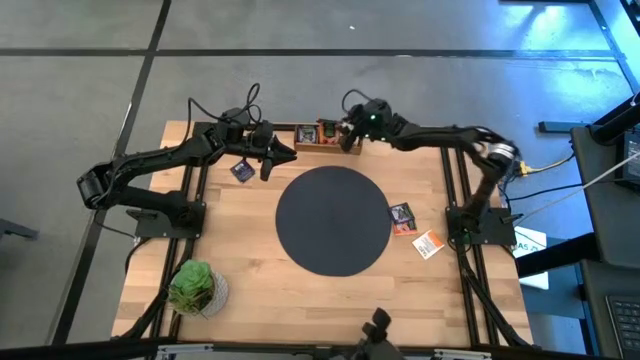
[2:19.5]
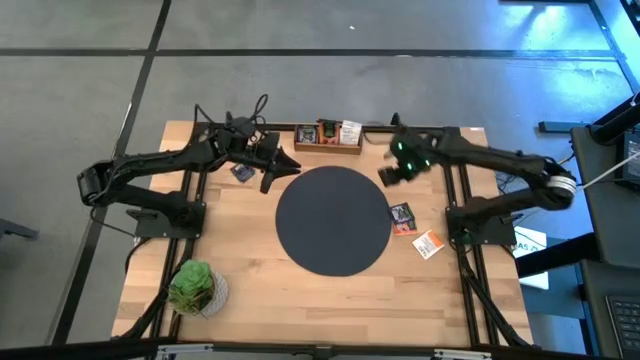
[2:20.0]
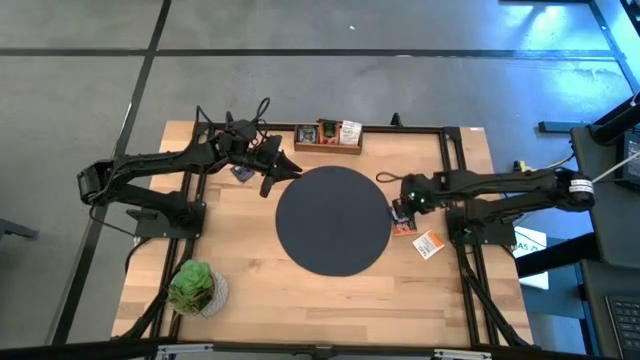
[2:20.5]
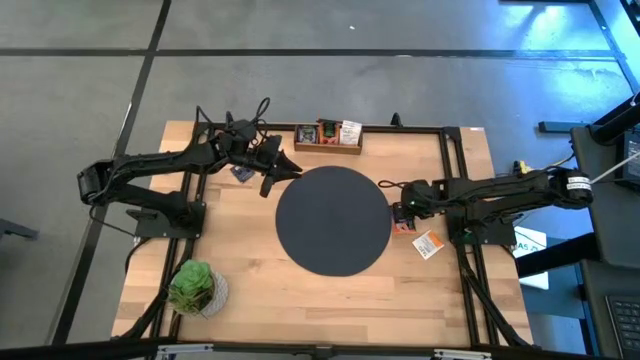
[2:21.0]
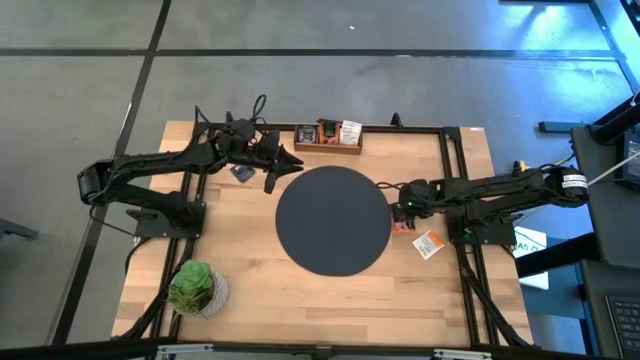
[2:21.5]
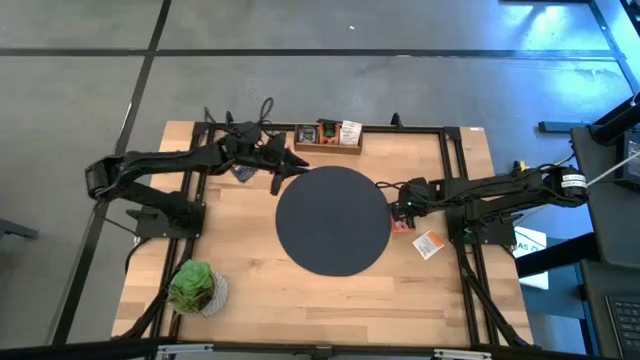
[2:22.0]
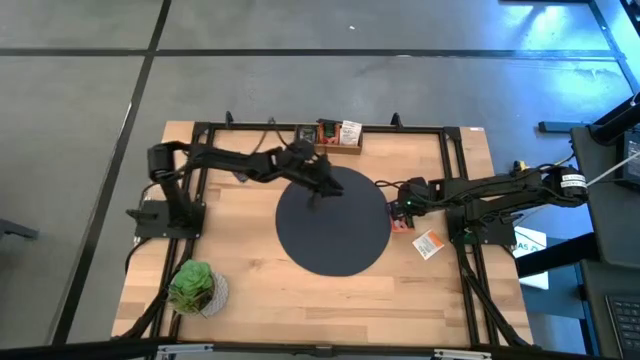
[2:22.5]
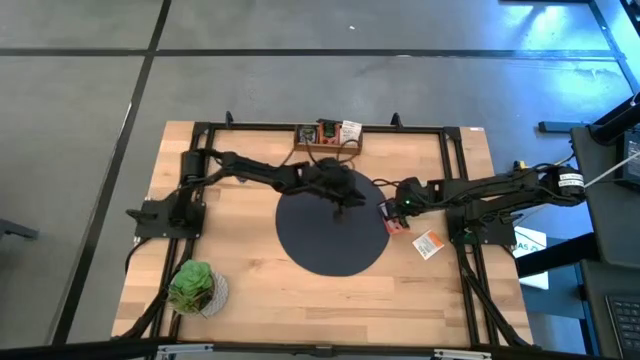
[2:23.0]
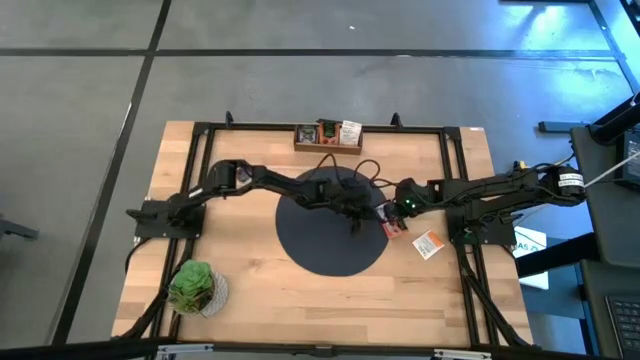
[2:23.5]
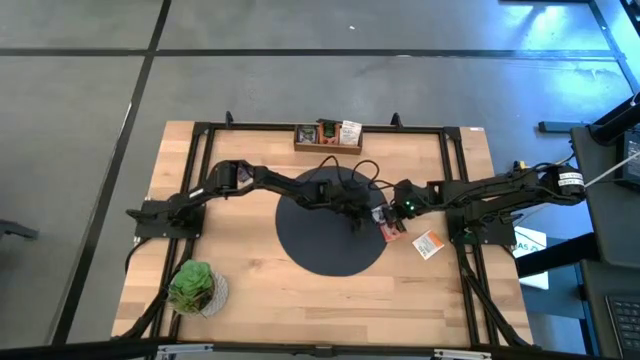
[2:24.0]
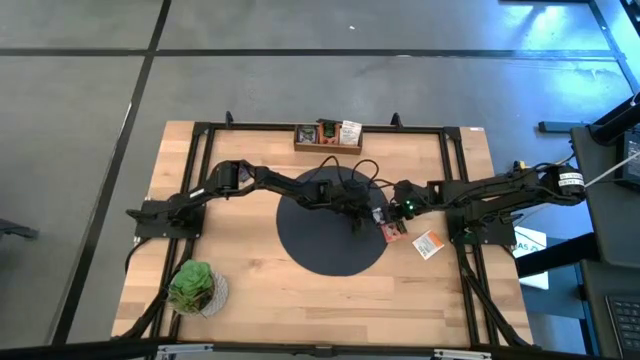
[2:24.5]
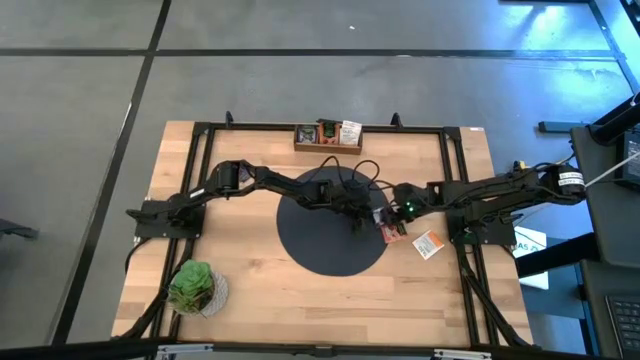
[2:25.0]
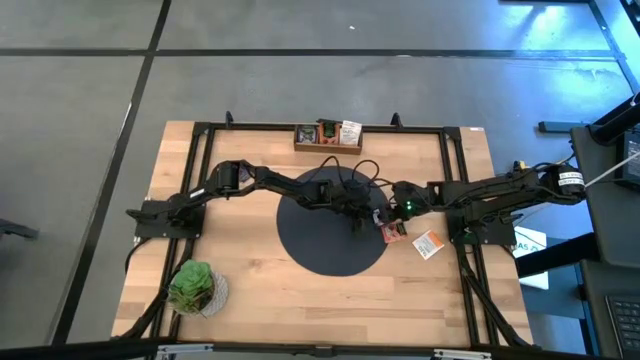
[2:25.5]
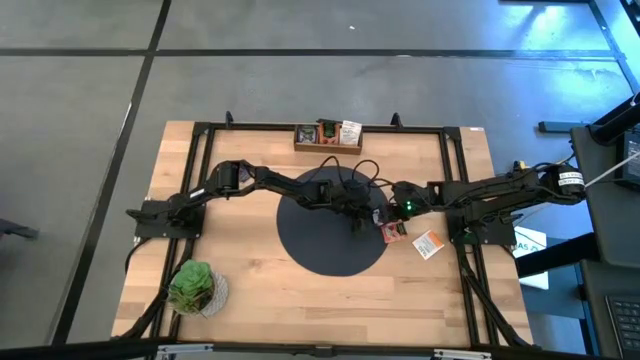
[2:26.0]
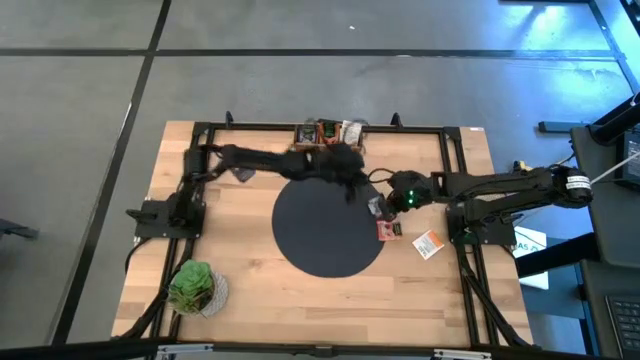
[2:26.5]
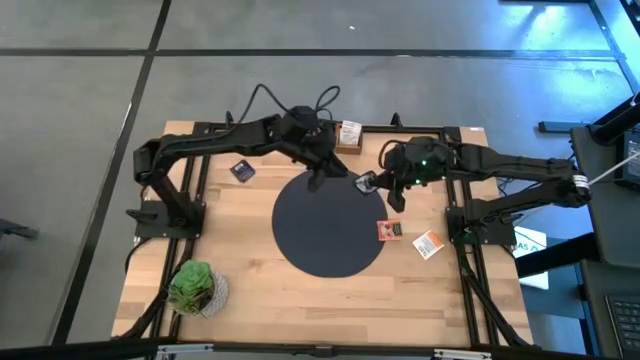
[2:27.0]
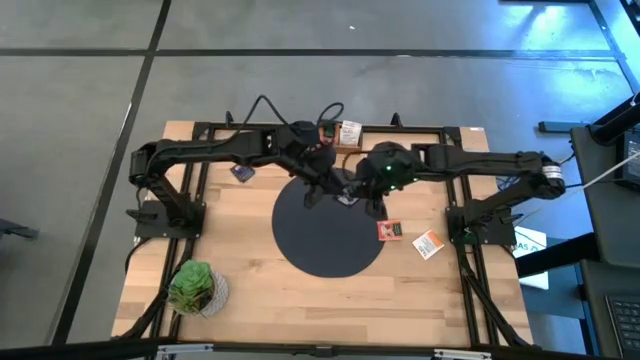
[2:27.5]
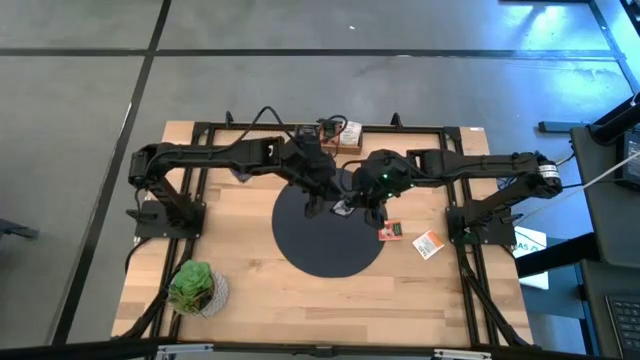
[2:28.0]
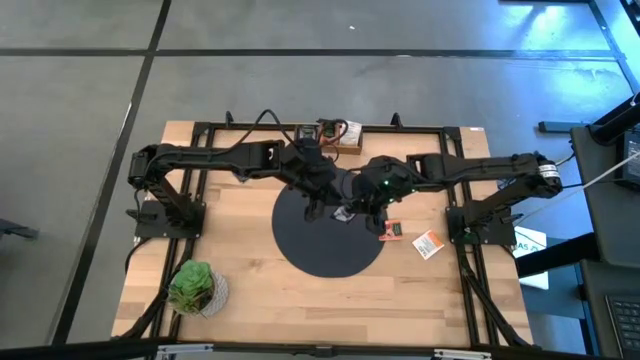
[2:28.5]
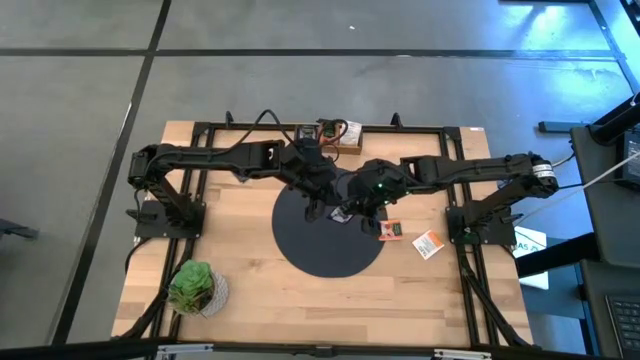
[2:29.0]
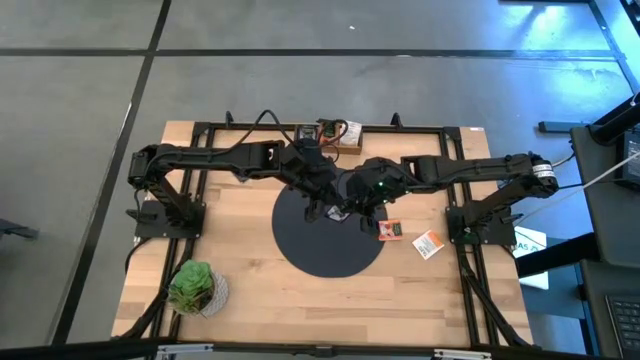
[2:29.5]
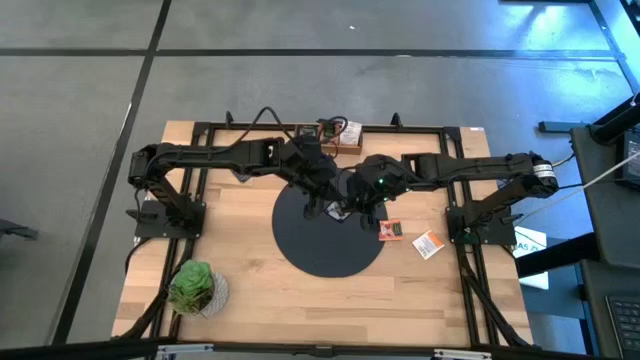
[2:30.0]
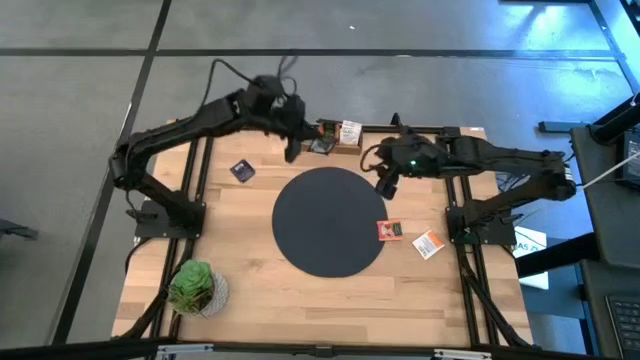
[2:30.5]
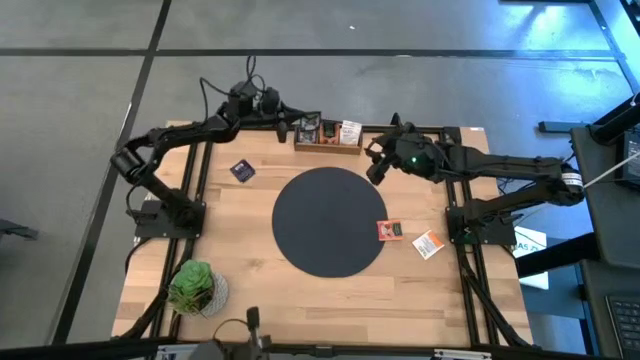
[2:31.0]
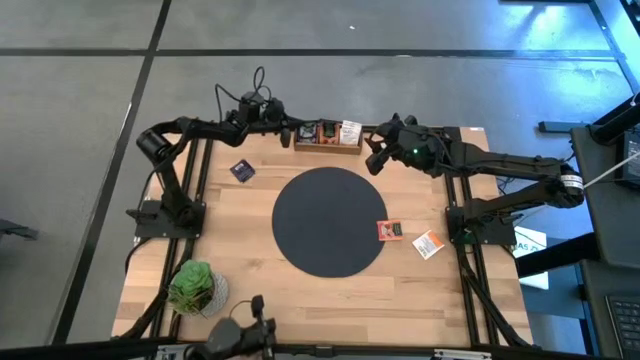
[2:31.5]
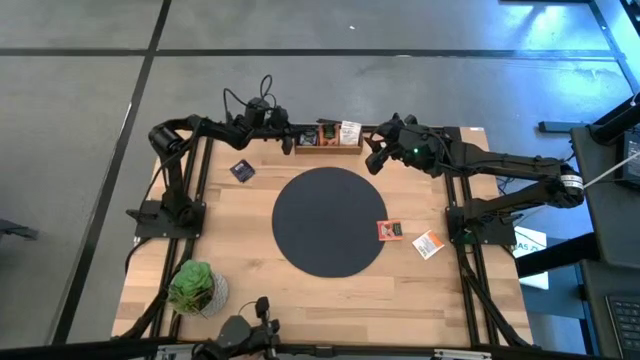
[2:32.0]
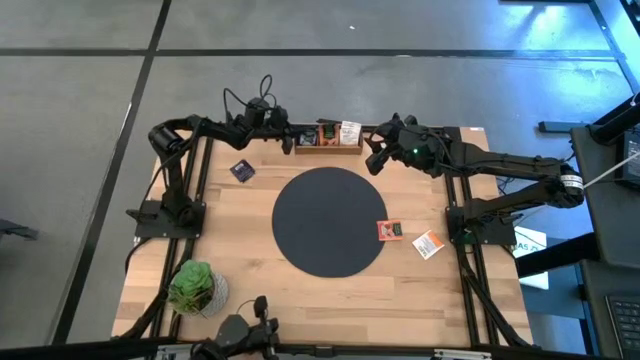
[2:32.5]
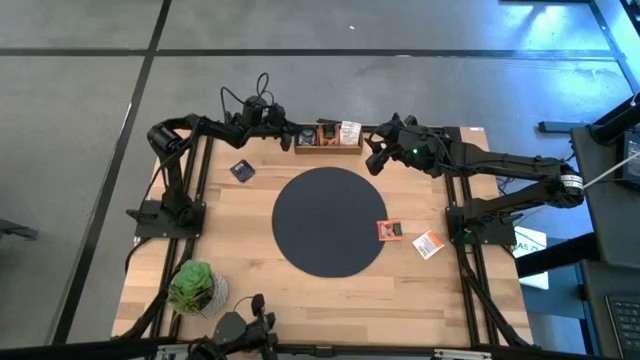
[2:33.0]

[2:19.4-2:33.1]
Task: Pick & Place Tea
Put the purple tea bag into the left section of the wooden organizer

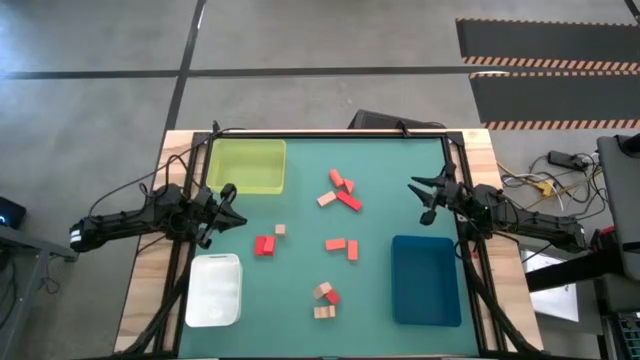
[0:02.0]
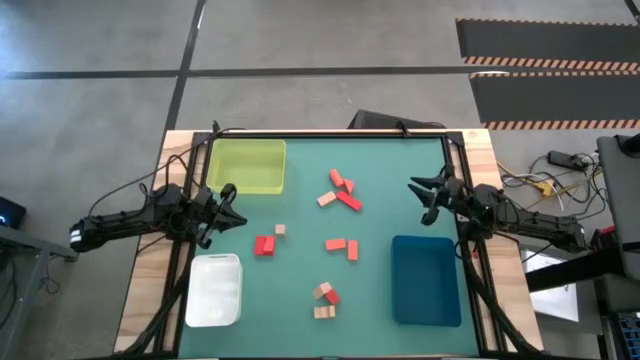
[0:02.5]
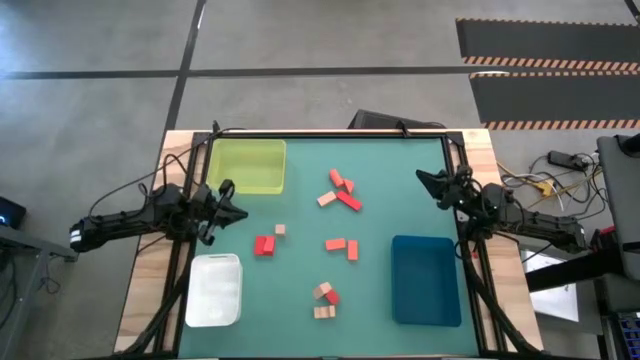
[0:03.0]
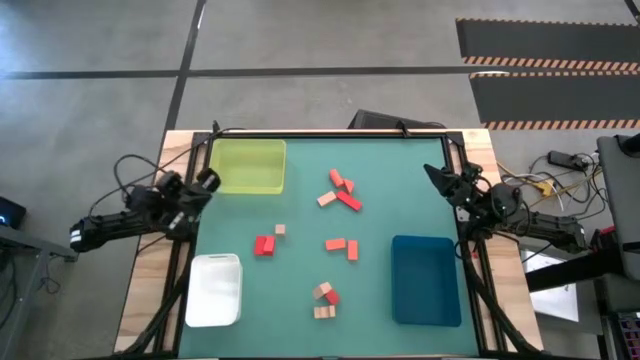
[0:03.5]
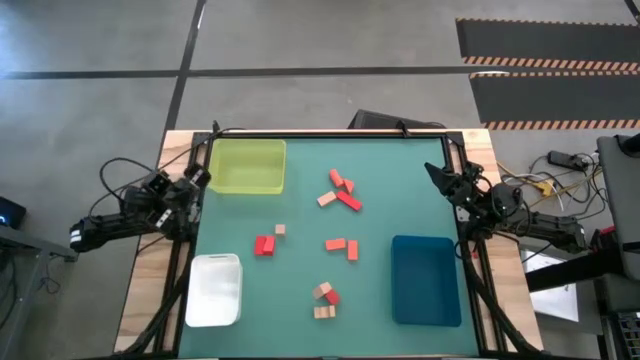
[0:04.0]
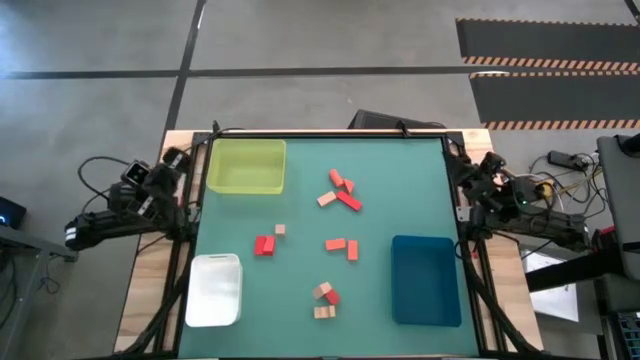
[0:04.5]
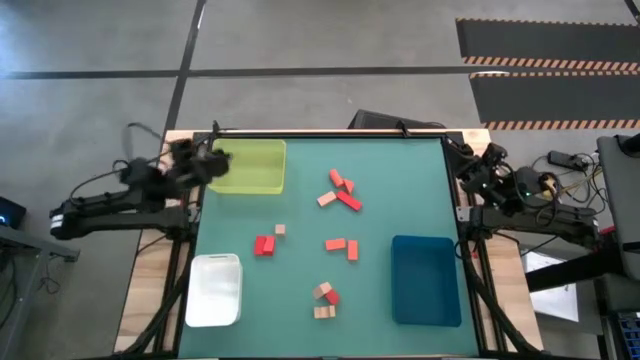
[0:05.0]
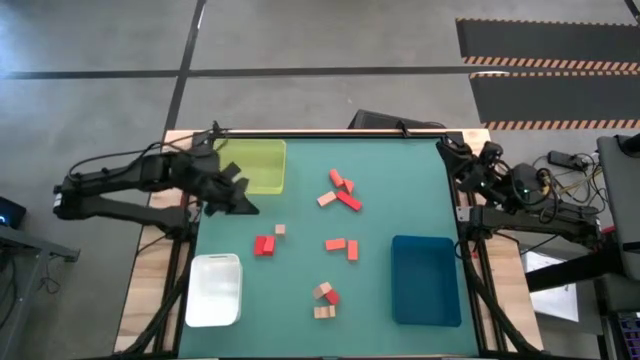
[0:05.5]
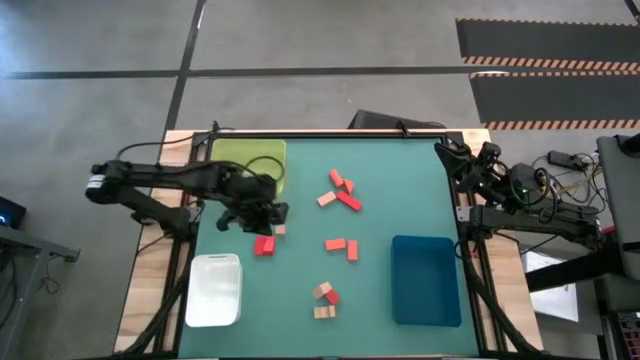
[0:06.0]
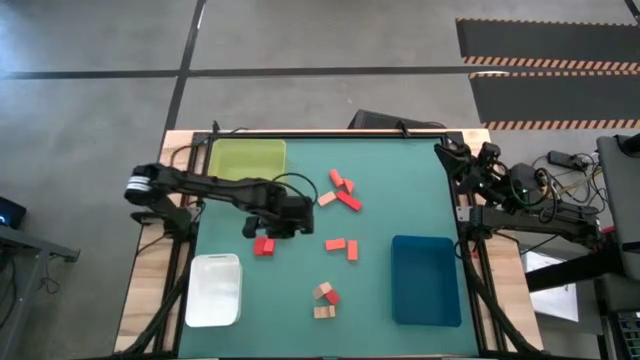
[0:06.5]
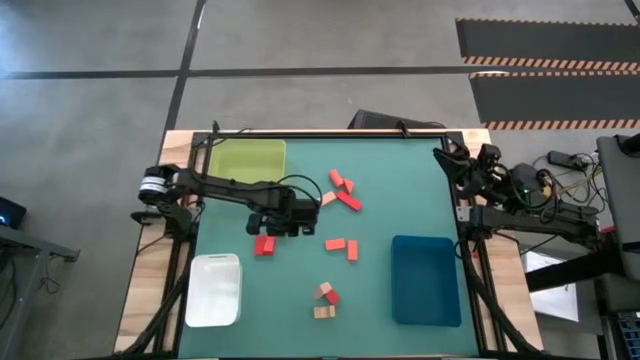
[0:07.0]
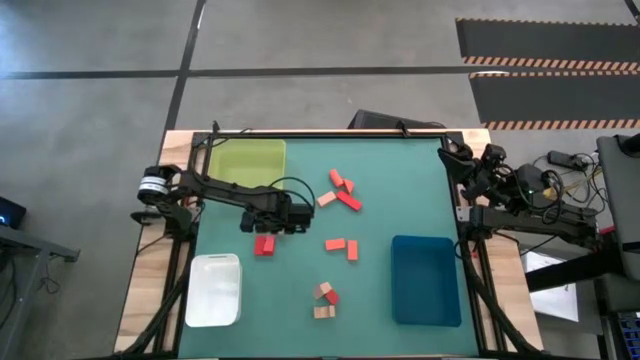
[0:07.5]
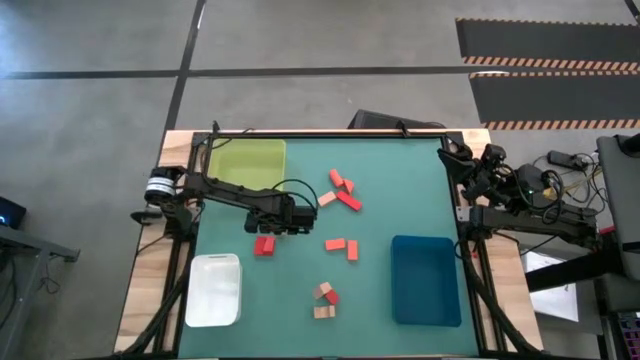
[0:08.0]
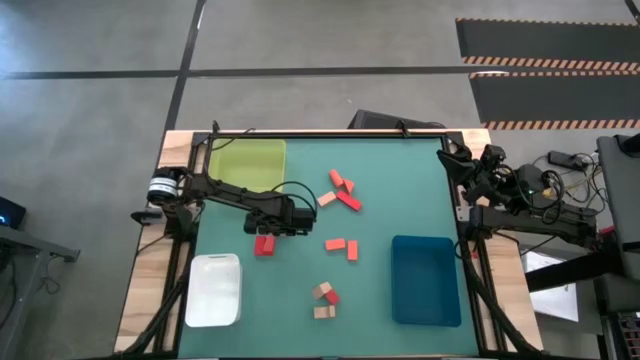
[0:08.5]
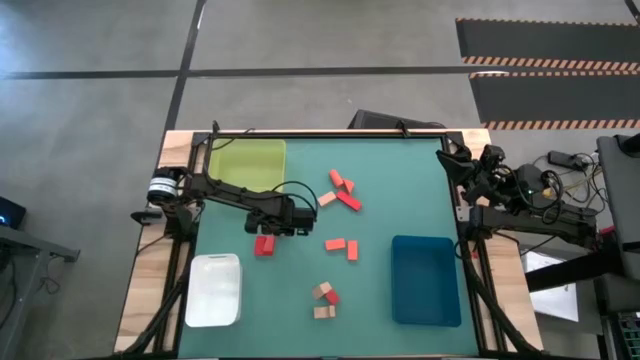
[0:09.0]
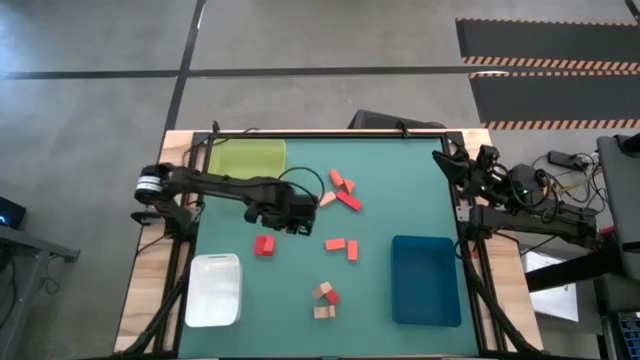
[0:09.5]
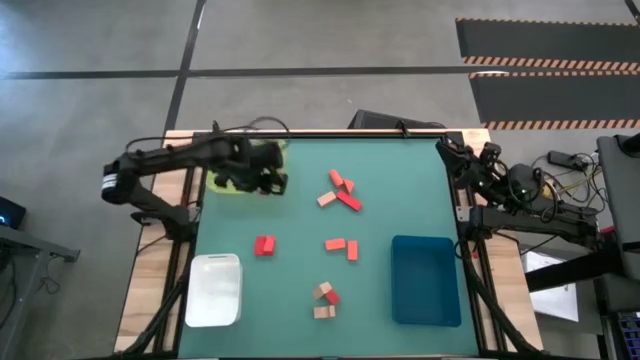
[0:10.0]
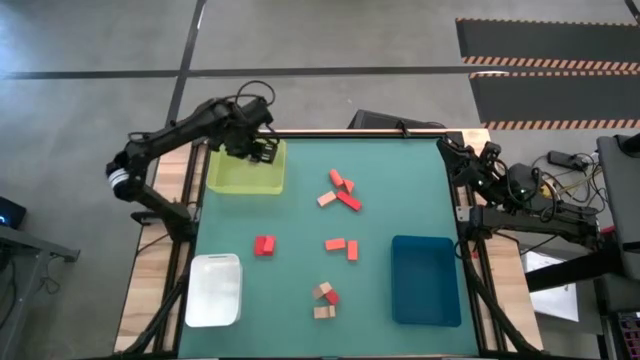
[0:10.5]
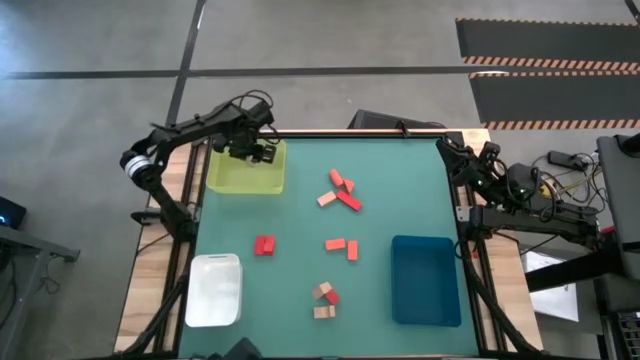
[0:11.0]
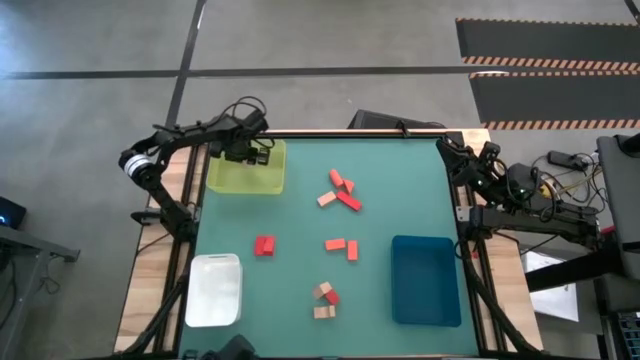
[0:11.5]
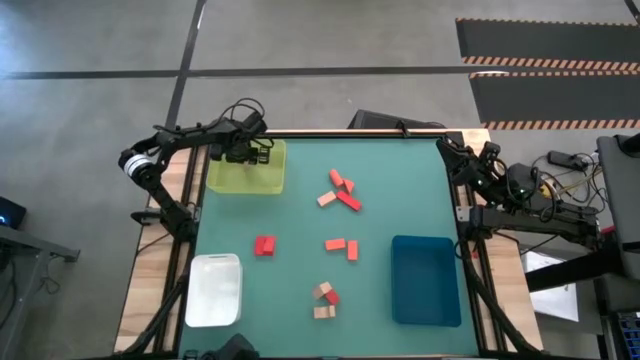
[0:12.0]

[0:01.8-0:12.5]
Task: Sort & place blocks by color
Put the light brown block into the yellow bin
